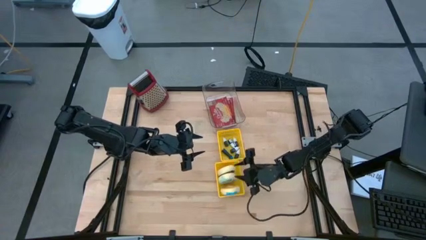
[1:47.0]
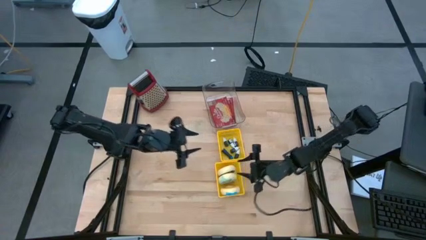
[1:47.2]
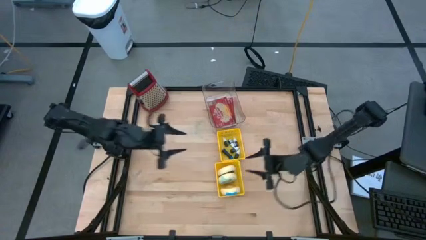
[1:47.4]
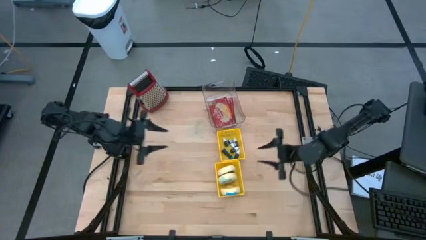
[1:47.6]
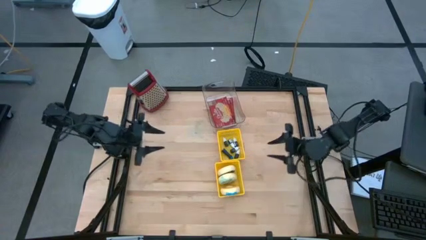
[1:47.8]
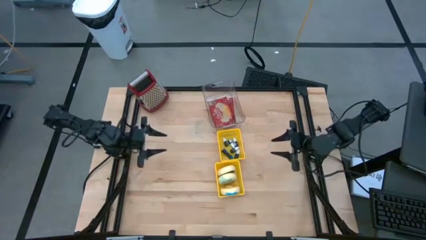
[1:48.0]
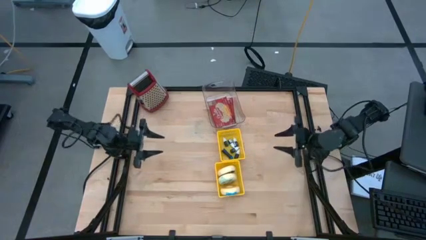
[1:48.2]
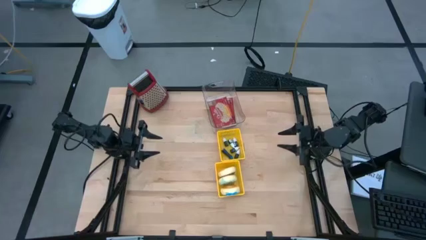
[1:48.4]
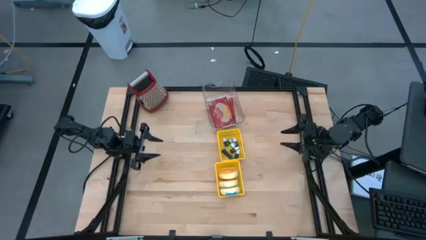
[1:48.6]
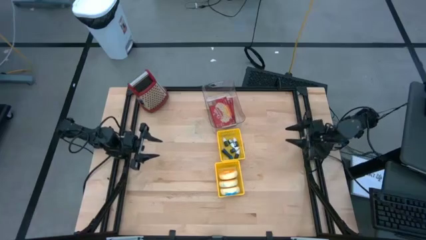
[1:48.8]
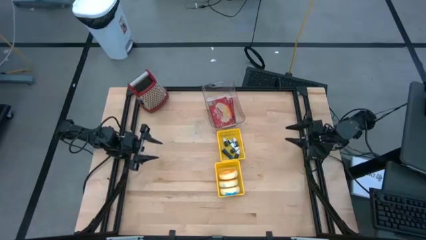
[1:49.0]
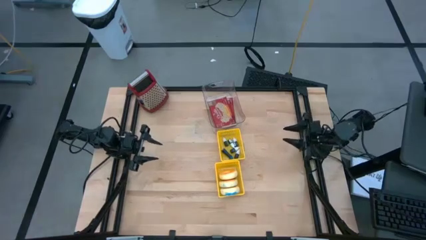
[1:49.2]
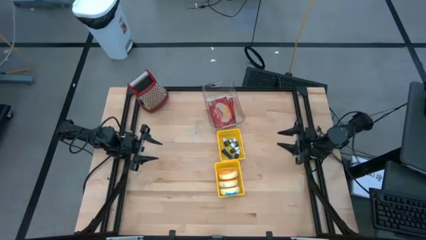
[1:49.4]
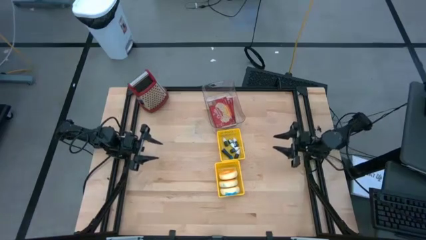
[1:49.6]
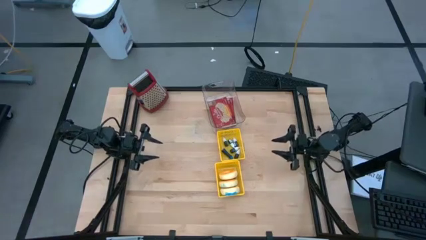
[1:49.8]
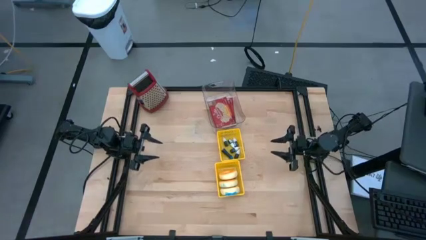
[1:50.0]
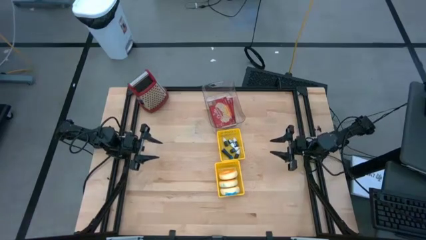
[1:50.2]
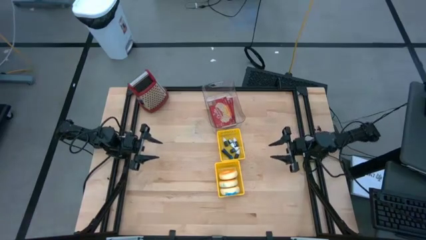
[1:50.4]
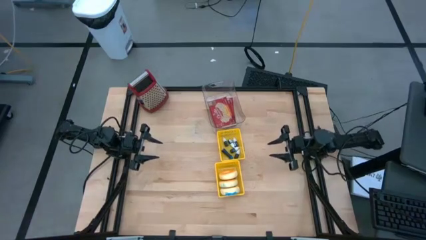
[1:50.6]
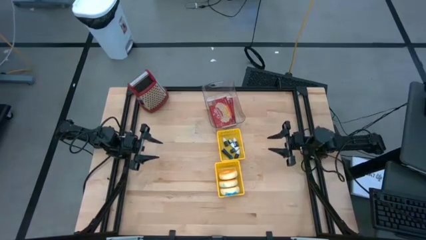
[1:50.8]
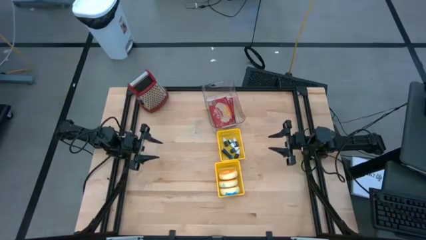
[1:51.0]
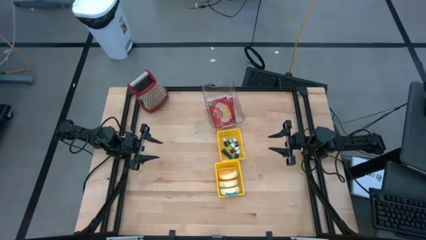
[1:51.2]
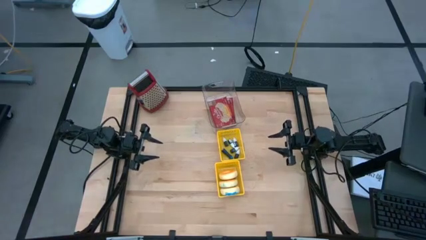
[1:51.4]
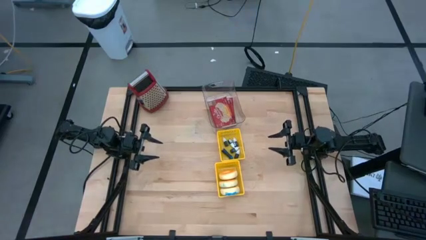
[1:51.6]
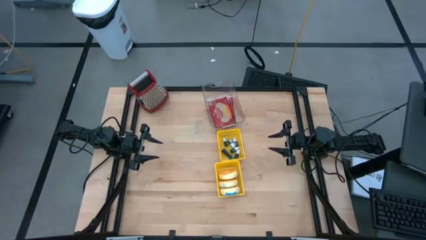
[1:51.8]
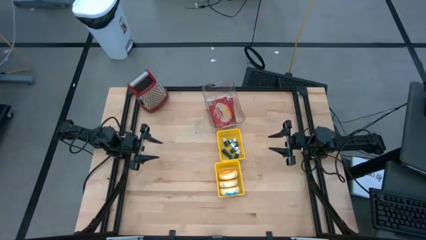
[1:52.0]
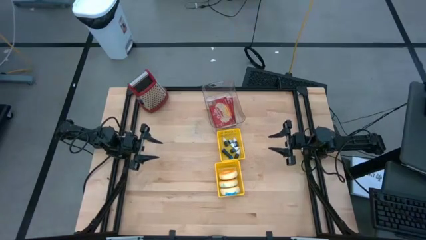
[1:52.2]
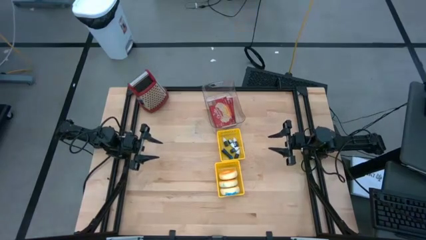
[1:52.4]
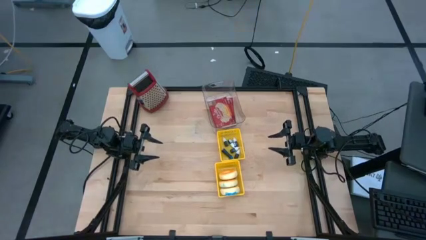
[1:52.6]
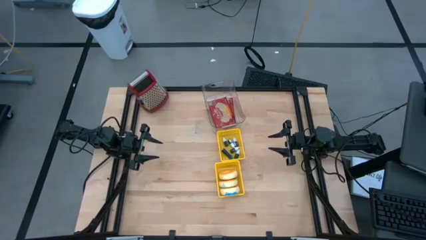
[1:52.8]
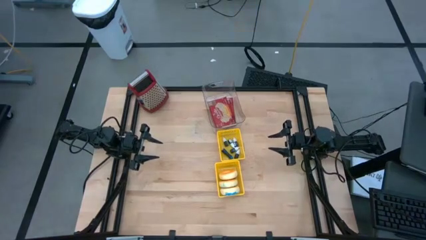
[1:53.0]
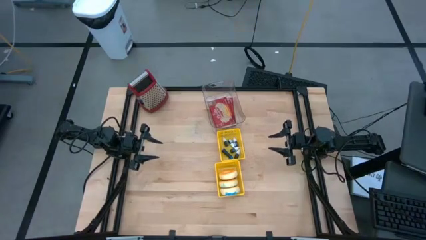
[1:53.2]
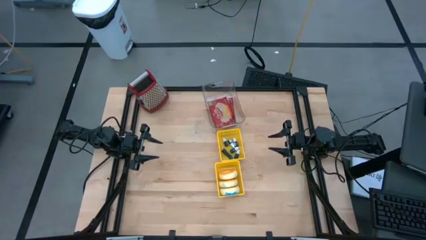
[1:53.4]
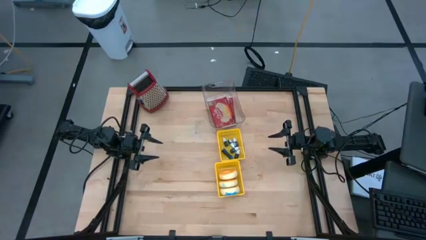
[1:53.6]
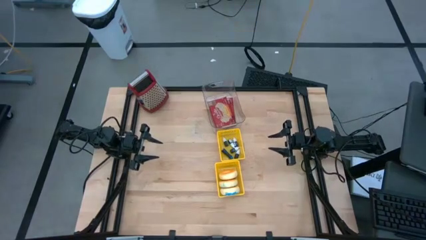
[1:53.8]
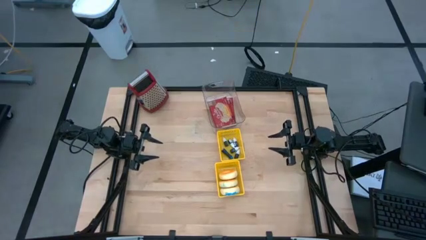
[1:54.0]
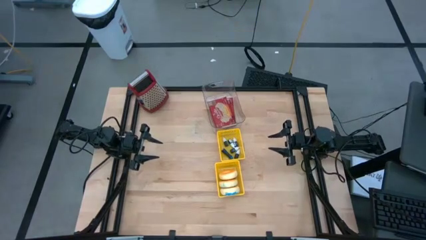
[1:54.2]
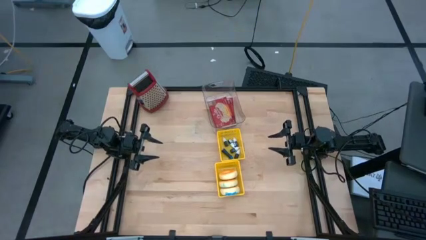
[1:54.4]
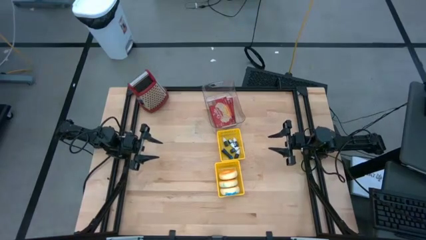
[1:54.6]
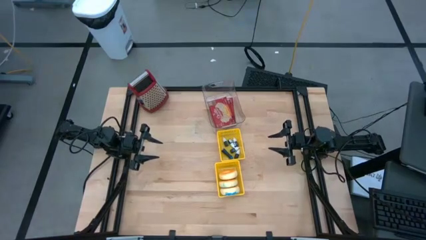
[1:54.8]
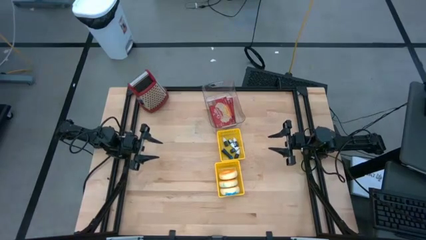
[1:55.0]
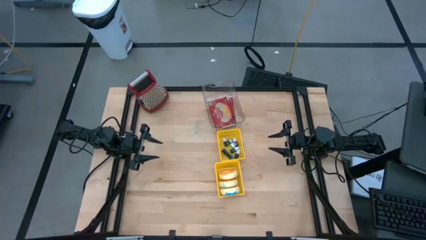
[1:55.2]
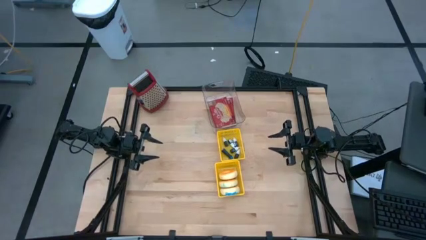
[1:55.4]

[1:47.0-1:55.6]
Return to Home Position
